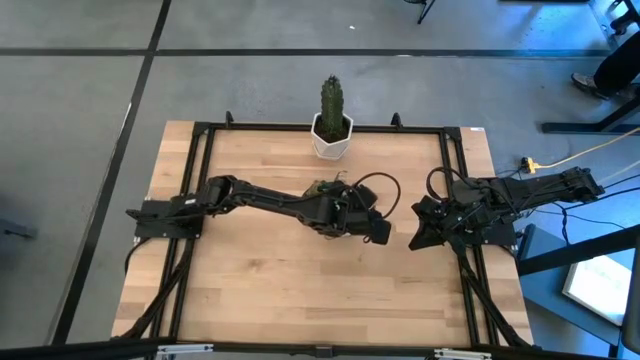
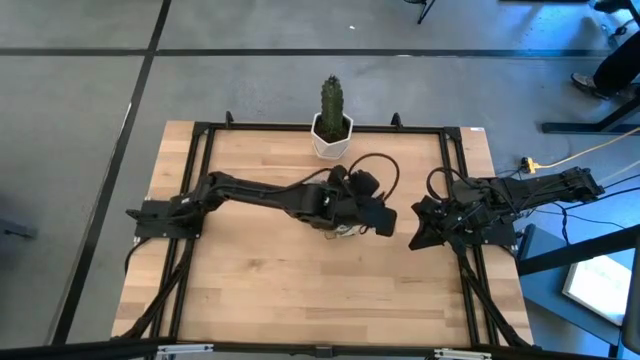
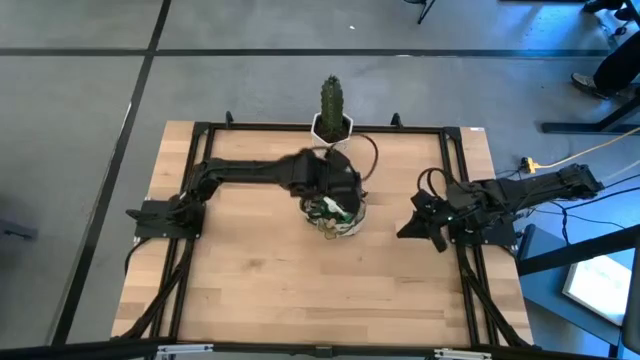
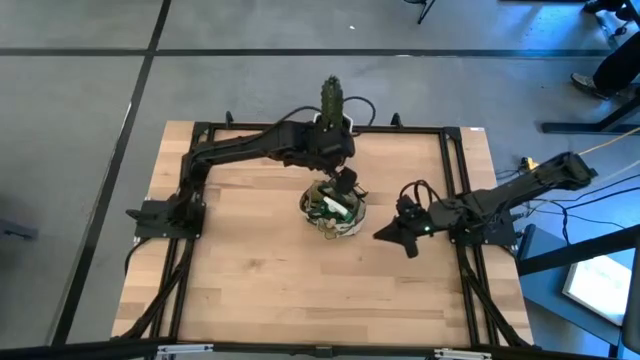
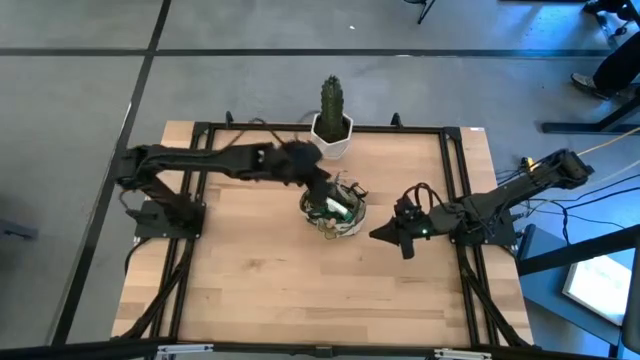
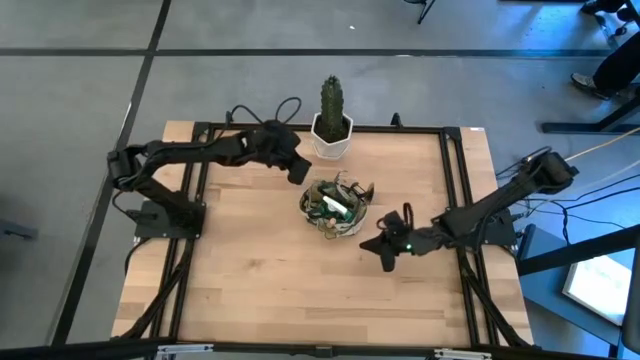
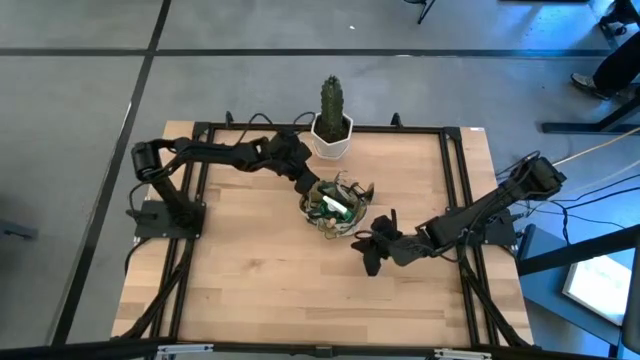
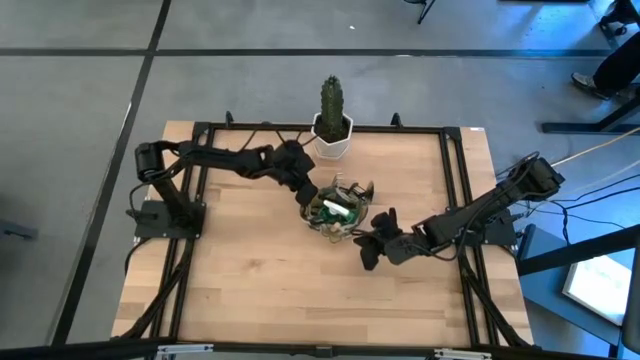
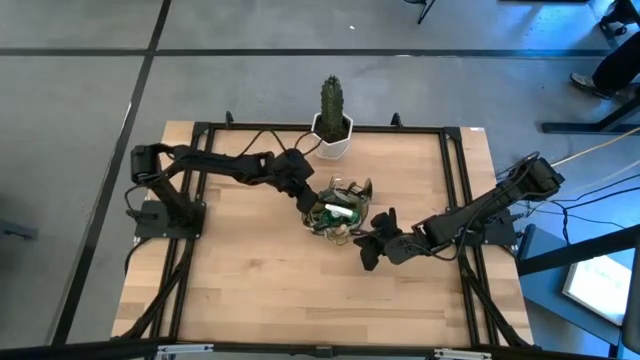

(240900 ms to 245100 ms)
Task: Pick & Place Garden tools in Gardening bag
Adjust the gardening bag

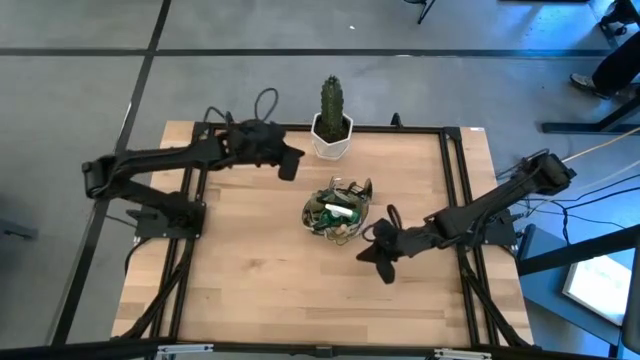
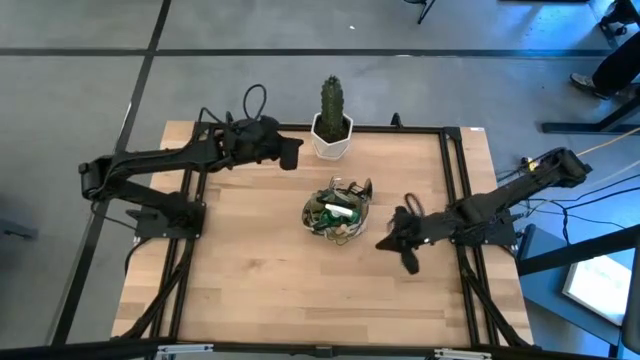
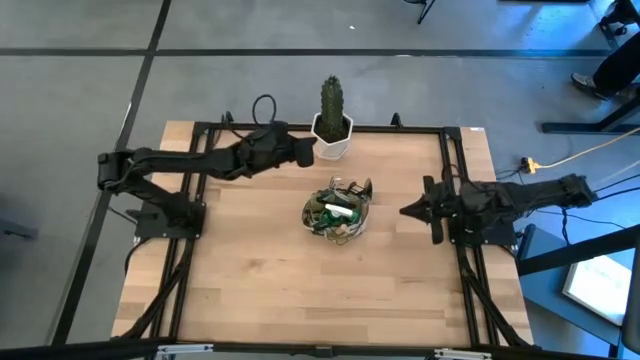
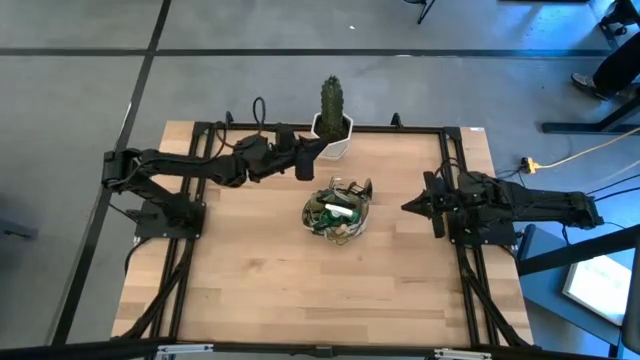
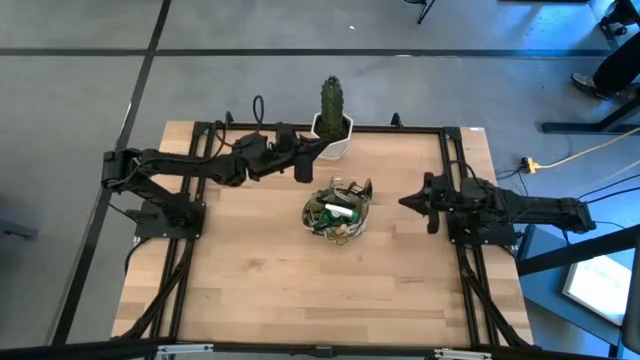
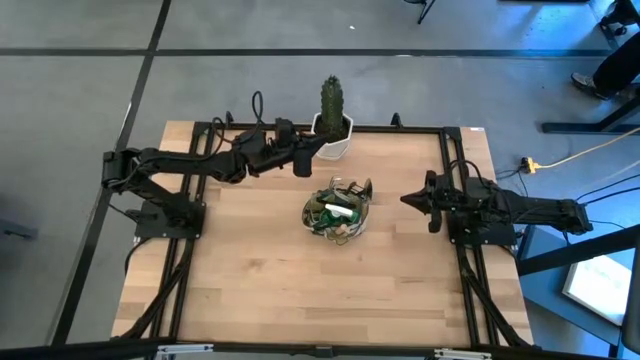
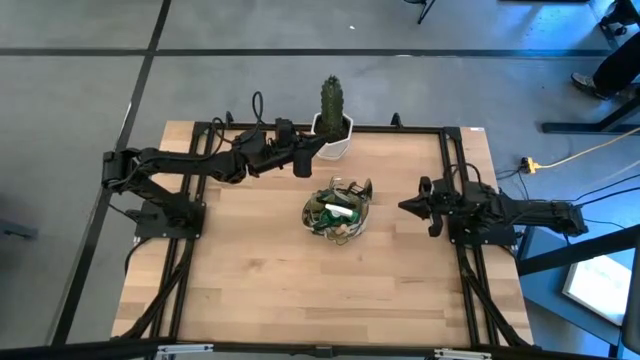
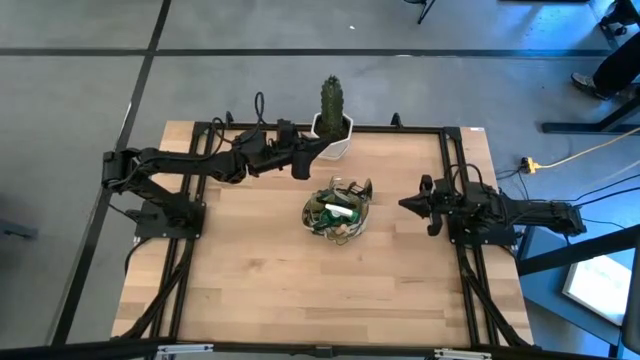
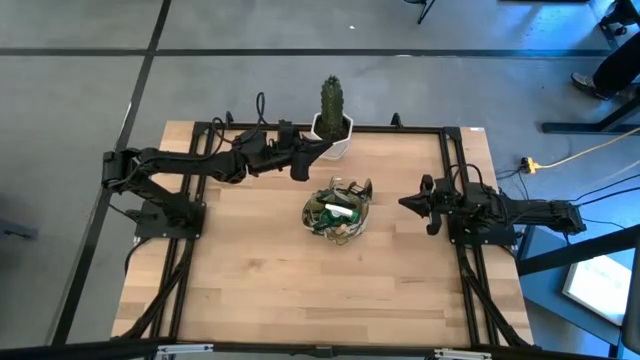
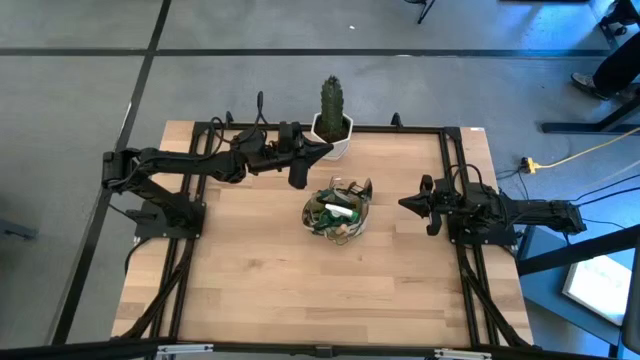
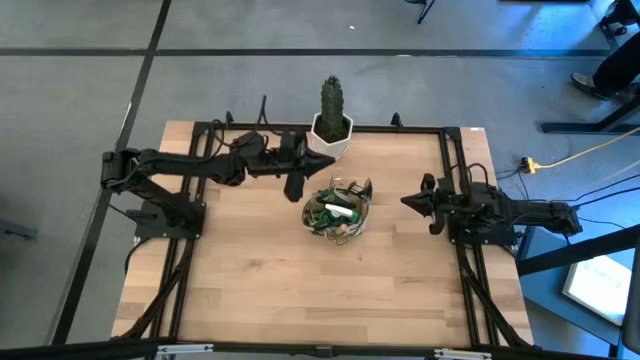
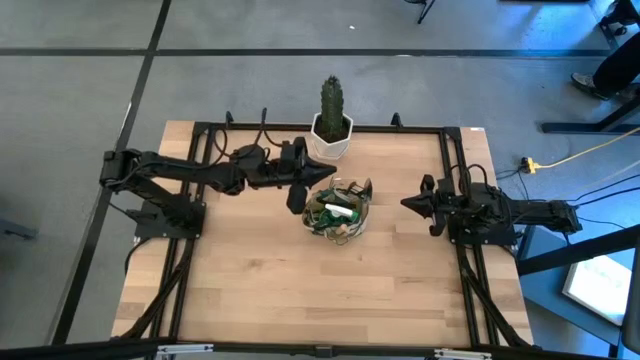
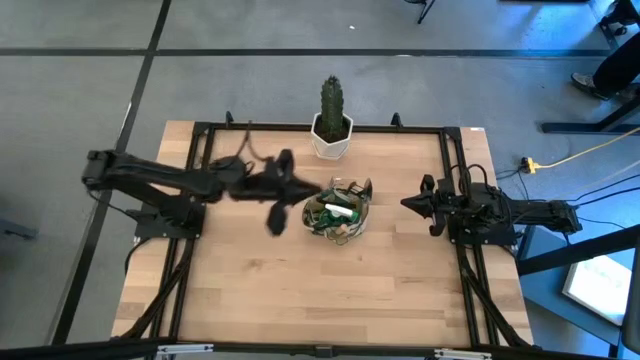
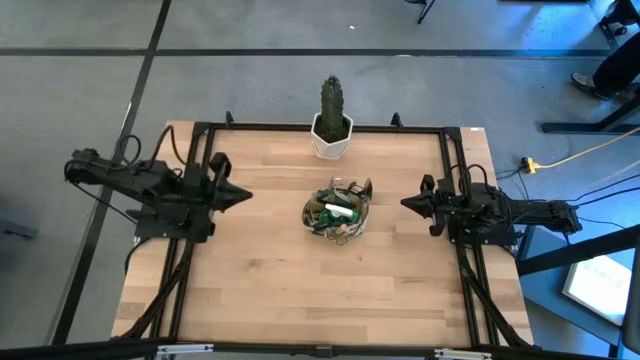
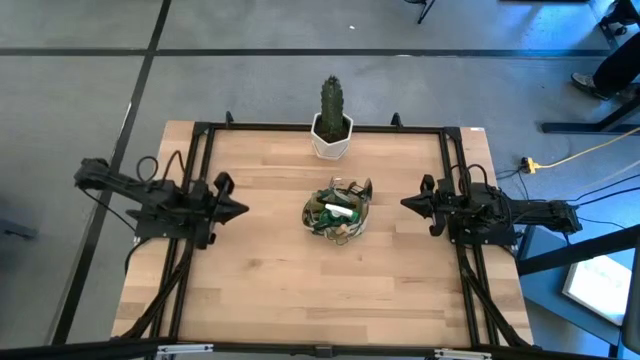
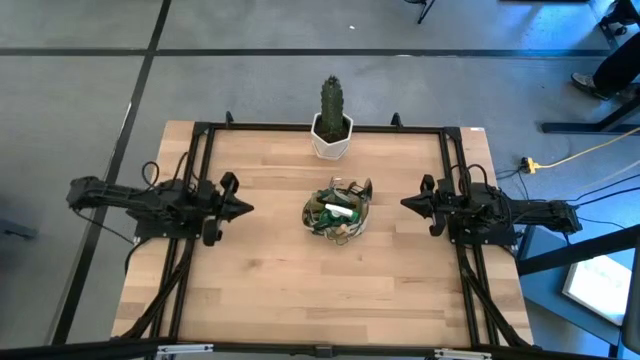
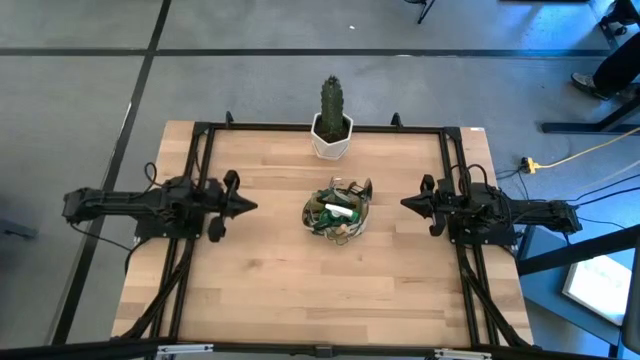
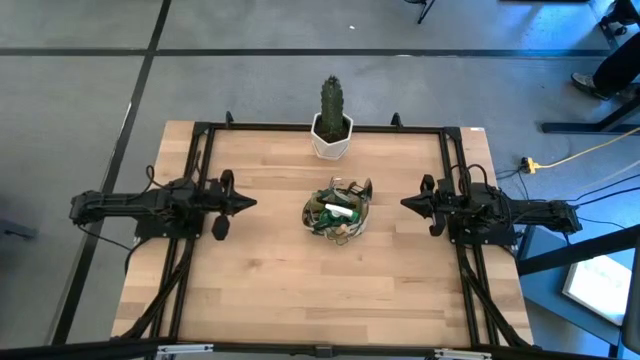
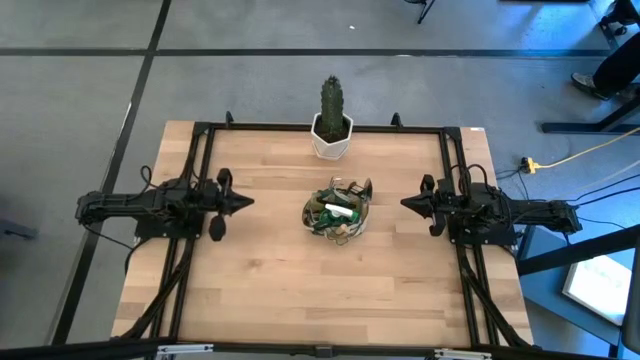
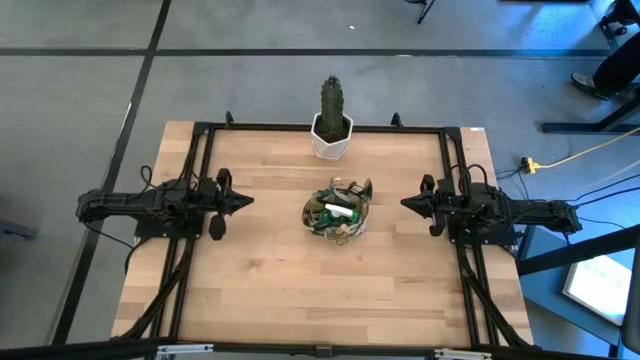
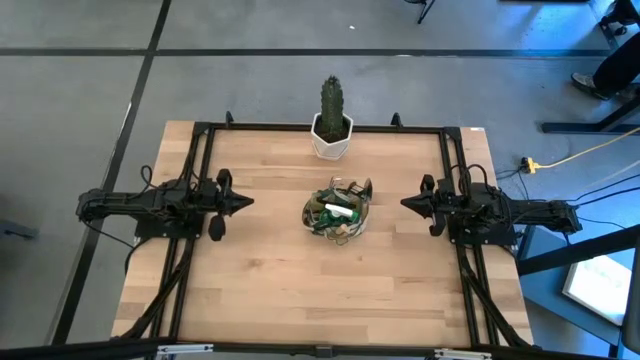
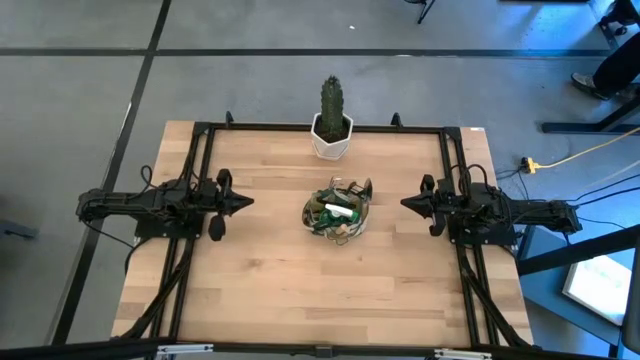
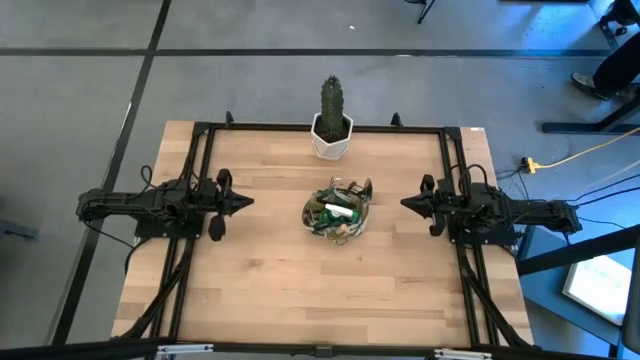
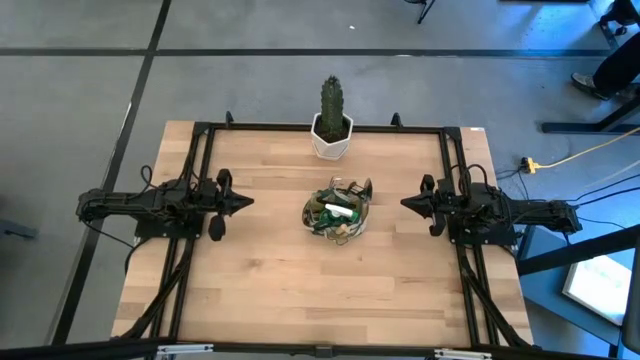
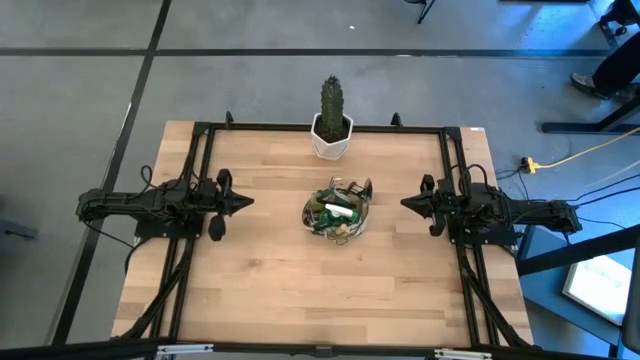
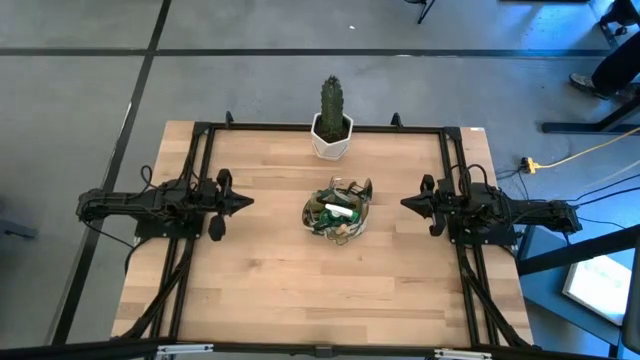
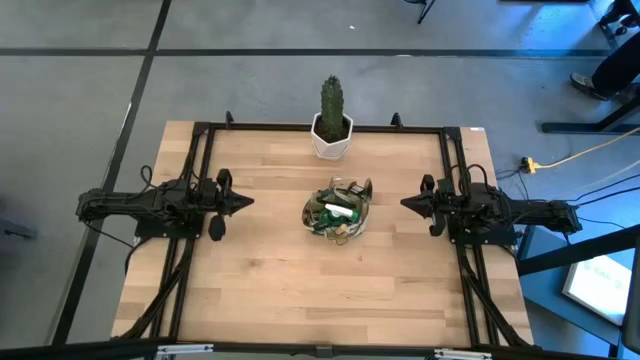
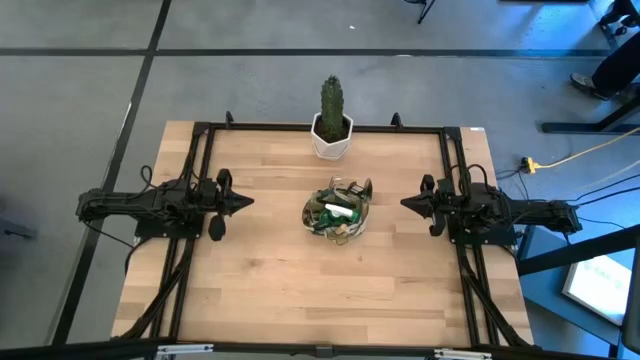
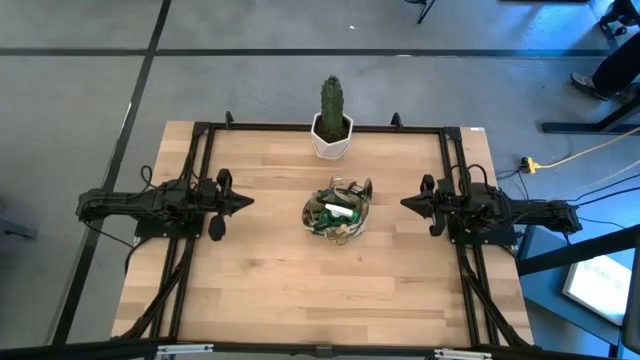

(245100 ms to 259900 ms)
Return to Home Position

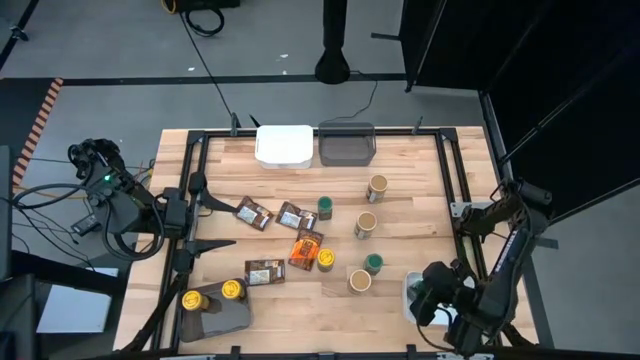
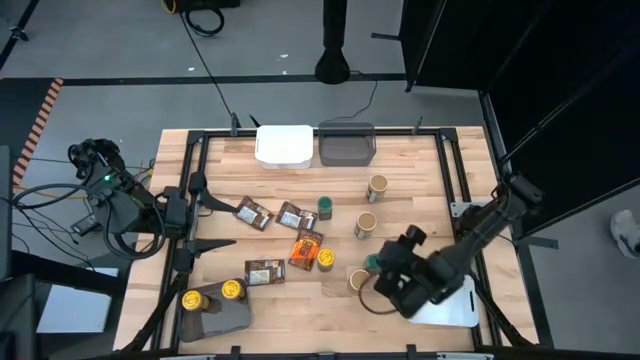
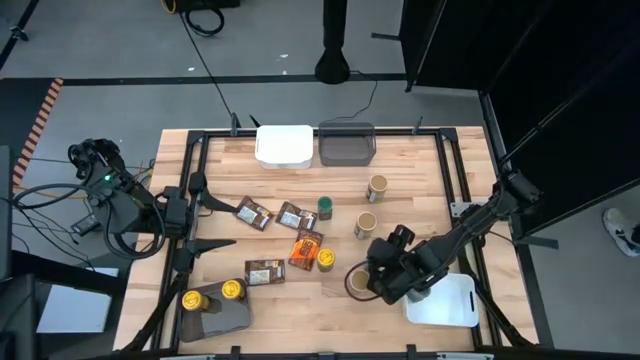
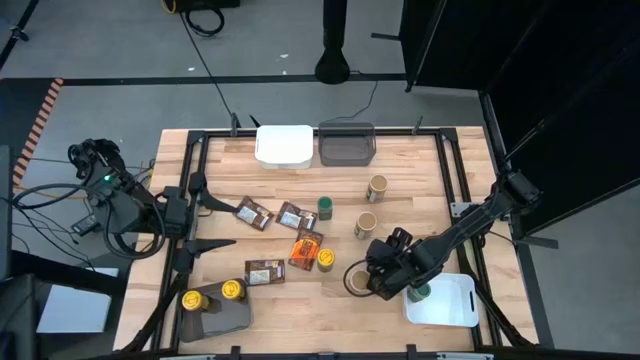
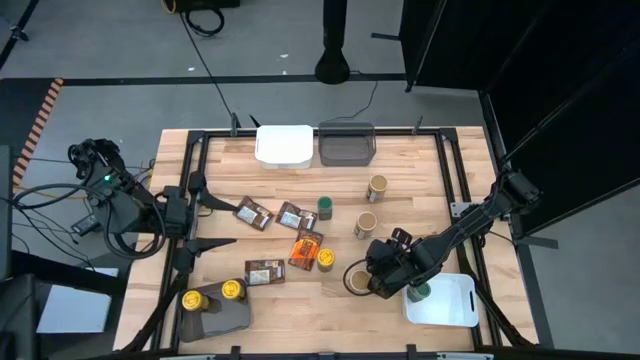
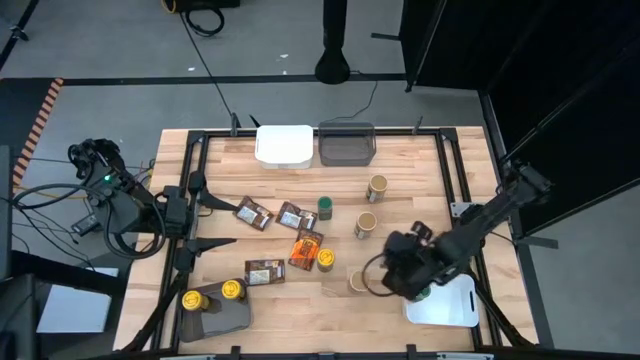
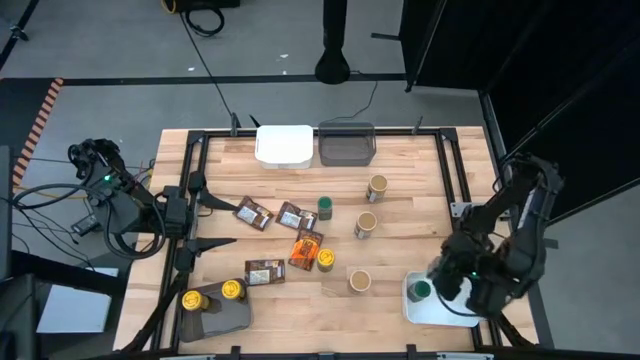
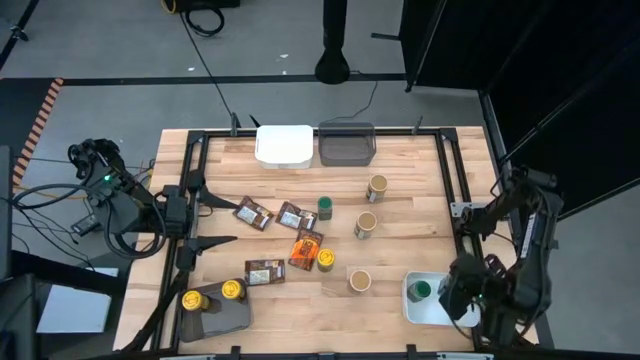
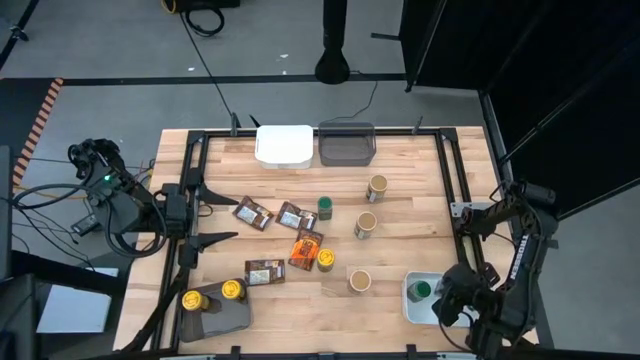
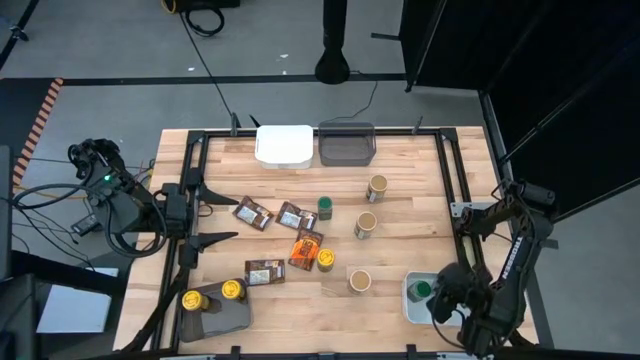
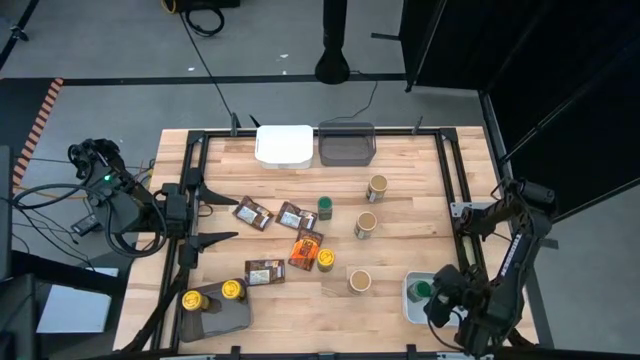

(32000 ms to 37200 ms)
Task: Sort spices by type
Put the green seasoning bottle into the bottom white bin
